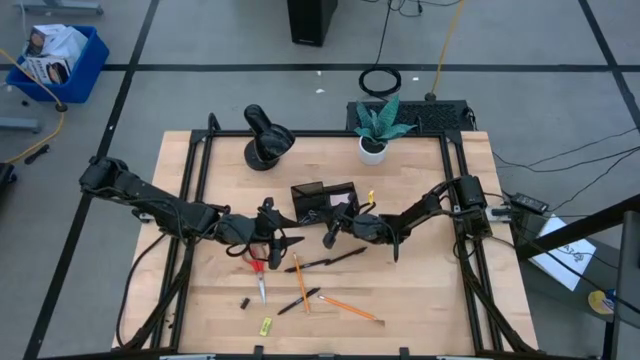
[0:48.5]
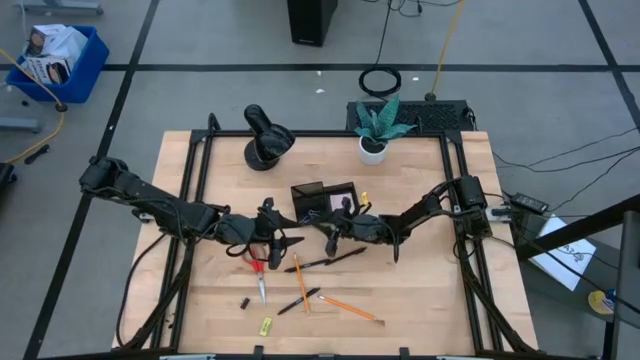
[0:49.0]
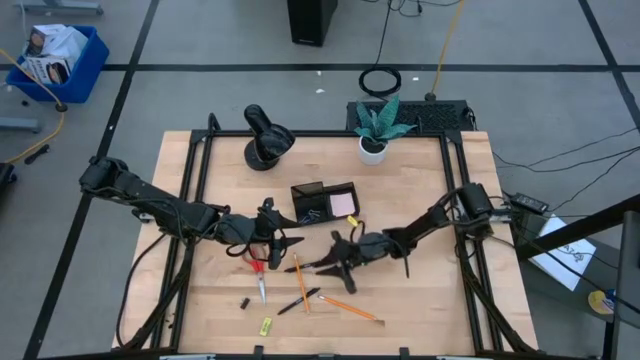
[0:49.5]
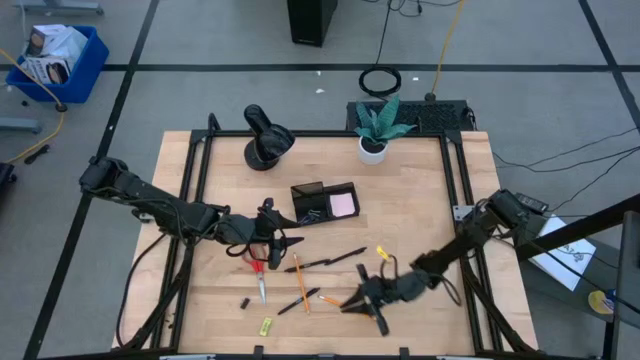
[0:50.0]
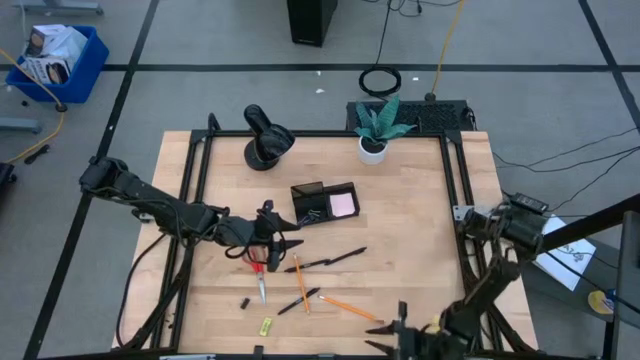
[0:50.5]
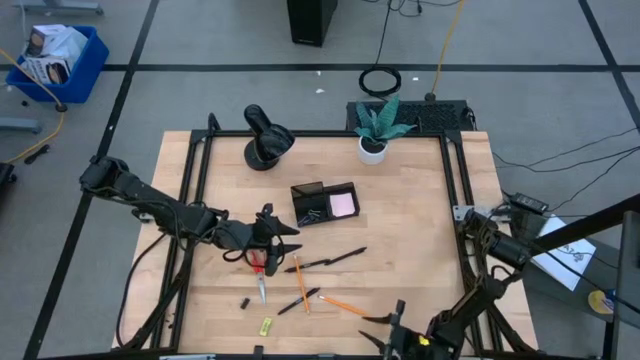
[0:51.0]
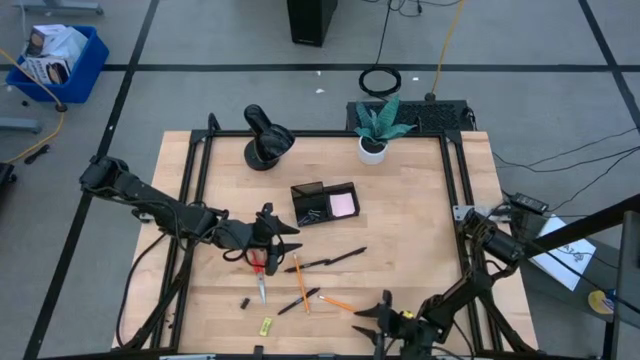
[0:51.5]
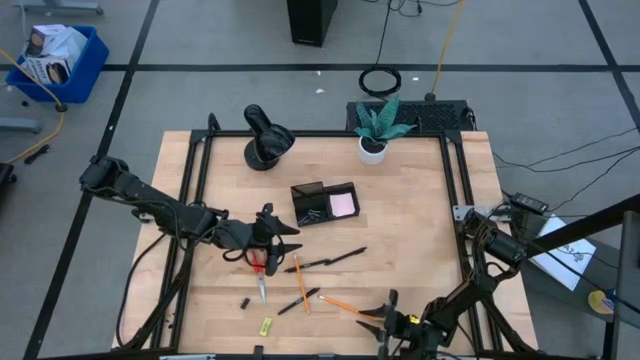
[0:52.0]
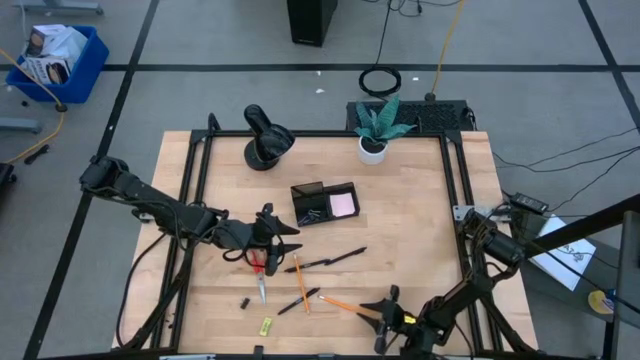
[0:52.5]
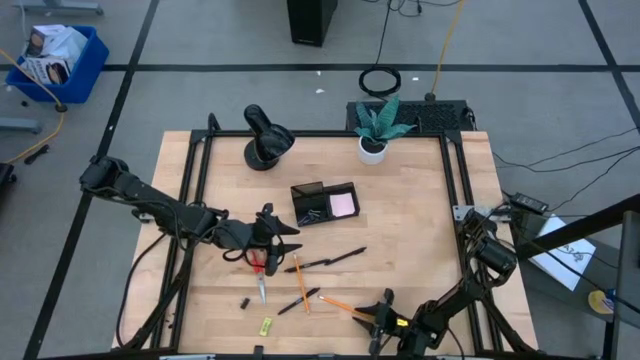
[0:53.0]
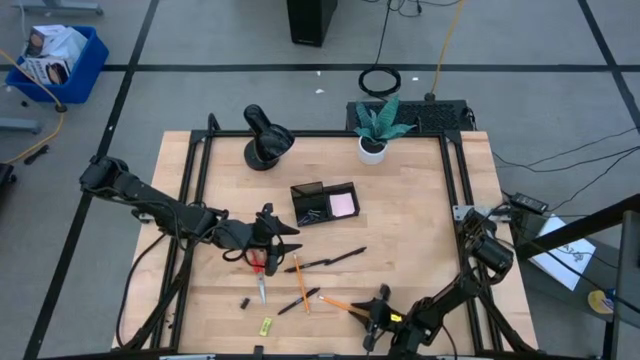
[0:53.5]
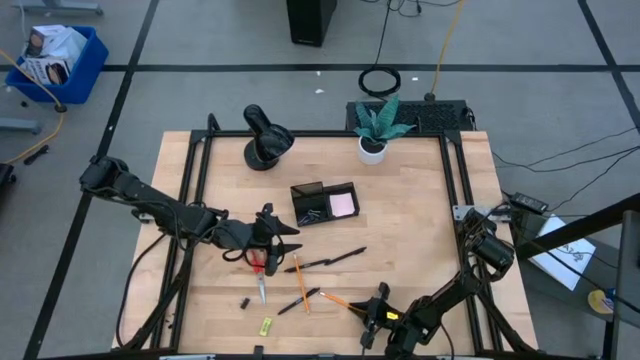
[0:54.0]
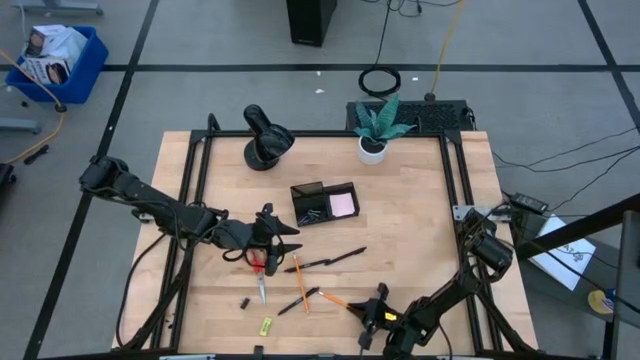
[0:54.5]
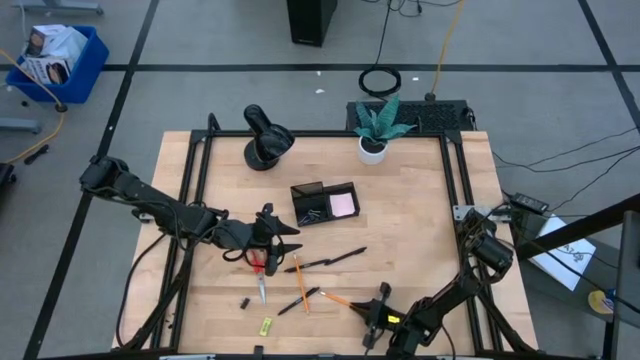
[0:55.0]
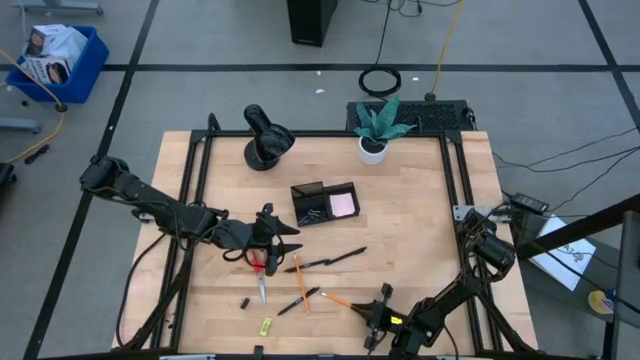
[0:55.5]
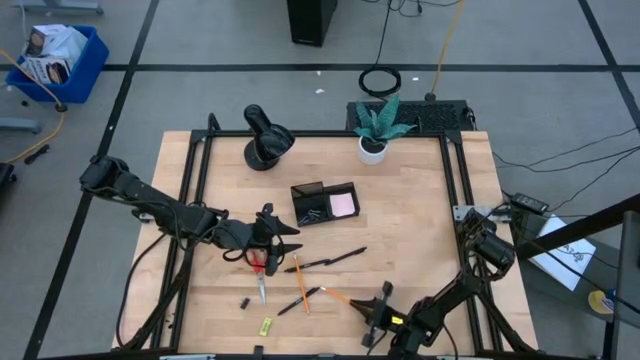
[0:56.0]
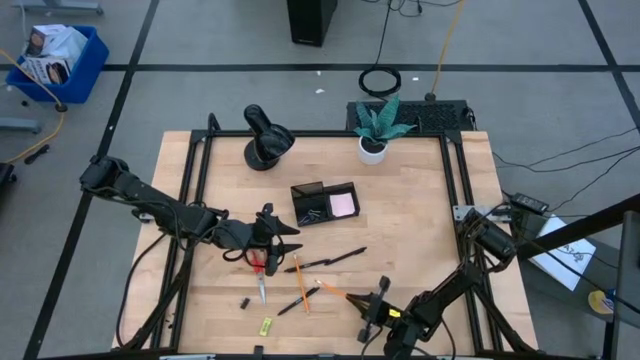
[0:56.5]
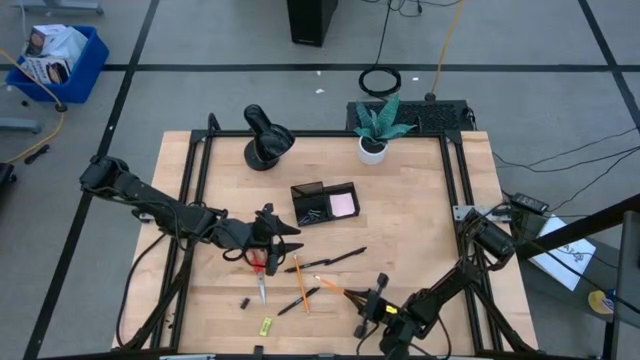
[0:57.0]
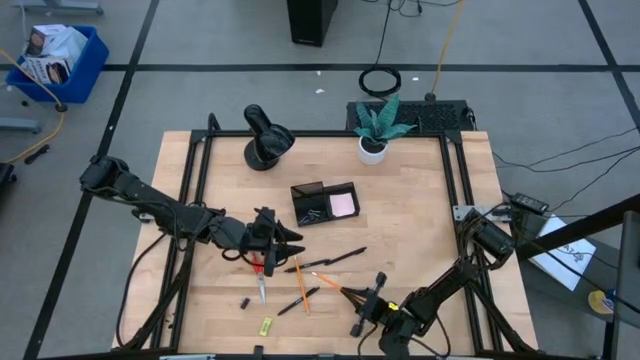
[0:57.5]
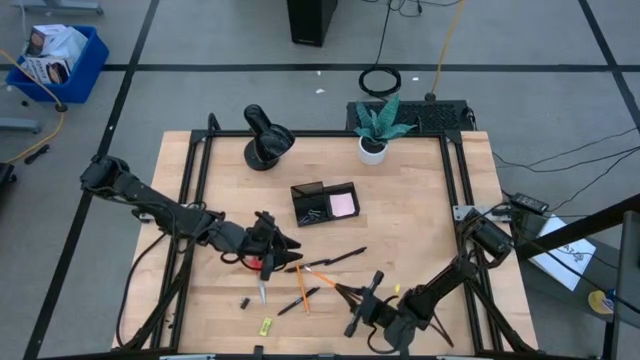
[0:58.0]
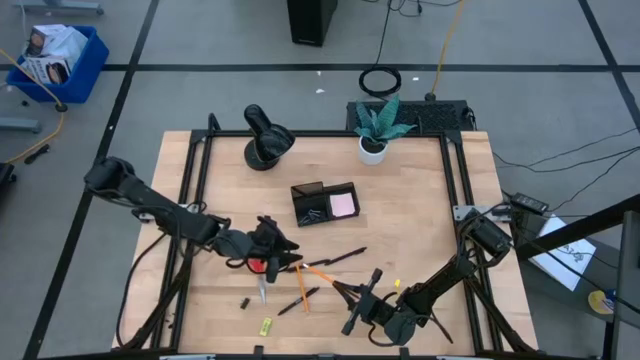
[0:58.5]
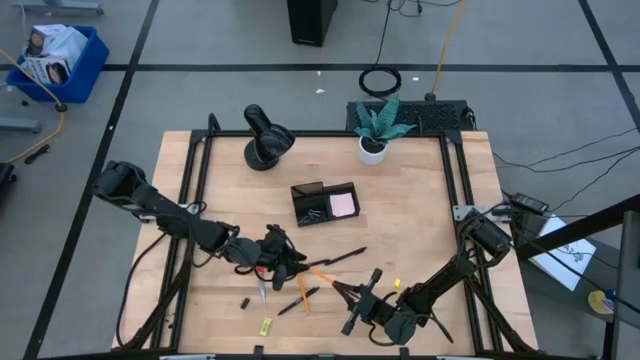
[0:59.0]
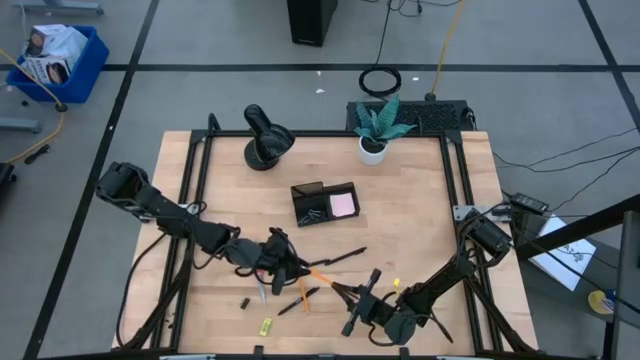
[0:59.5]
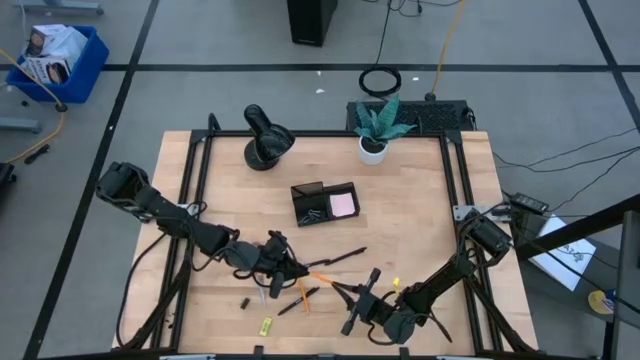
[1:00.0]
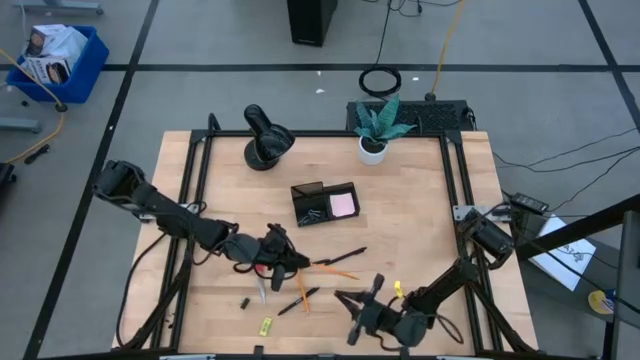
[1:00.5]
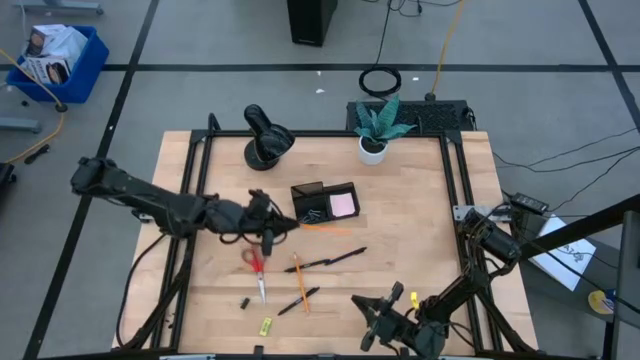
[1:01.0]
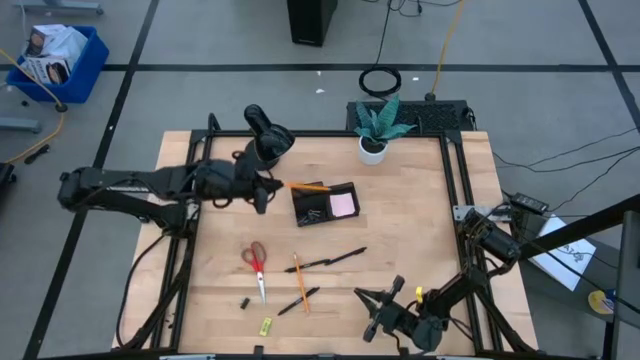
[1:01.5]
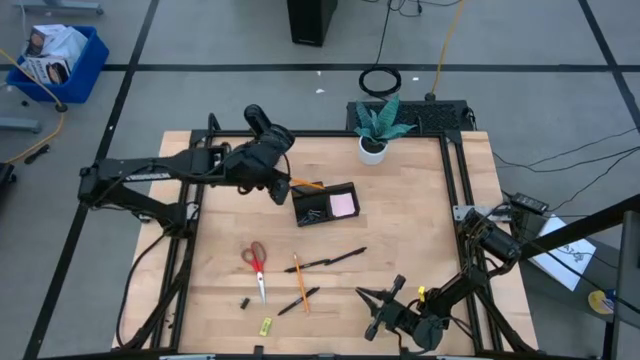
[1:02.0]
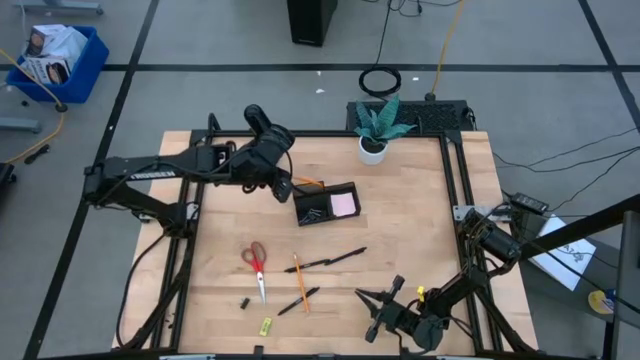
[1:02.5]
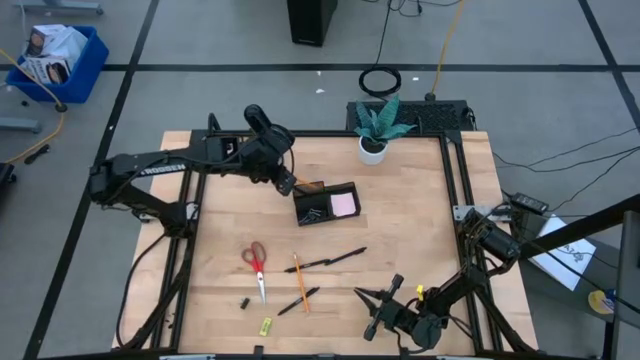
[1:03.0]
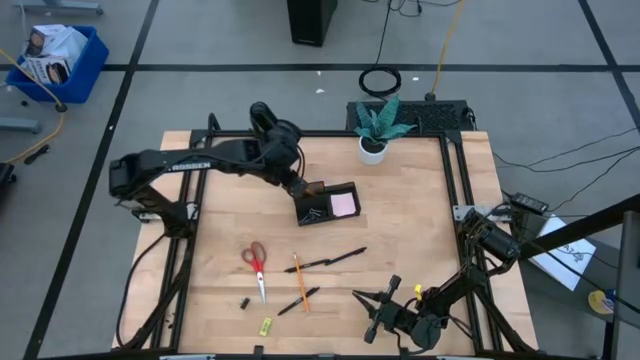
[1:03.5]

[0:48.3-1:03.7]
Task: Pick and place office supplies into organizer
Put the orange pencil into the desk organizer

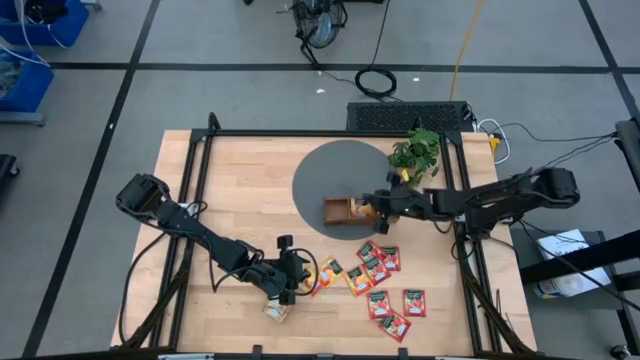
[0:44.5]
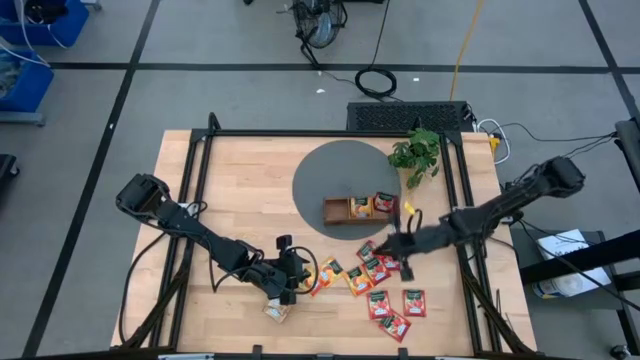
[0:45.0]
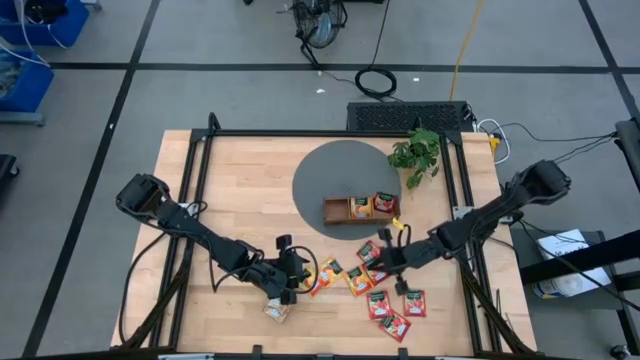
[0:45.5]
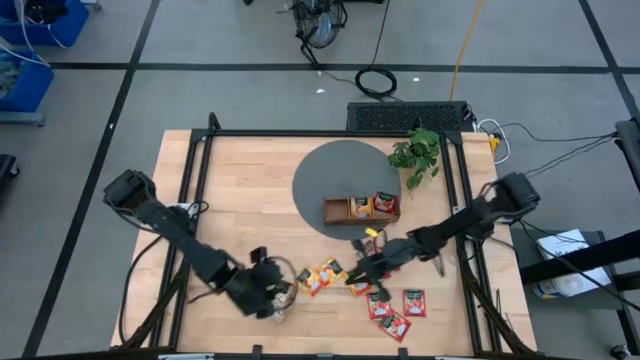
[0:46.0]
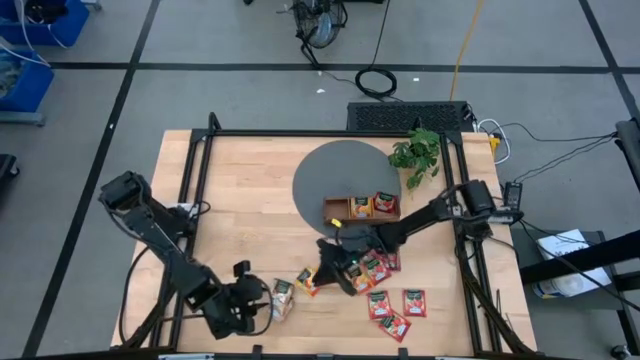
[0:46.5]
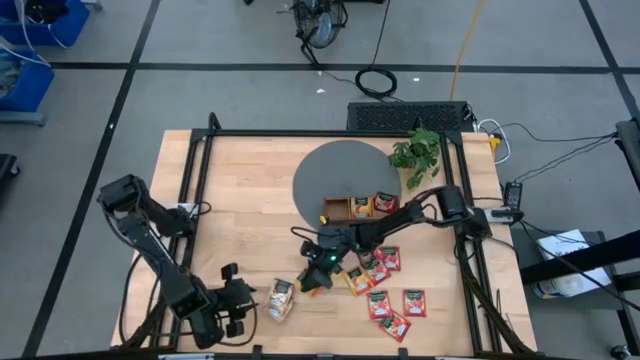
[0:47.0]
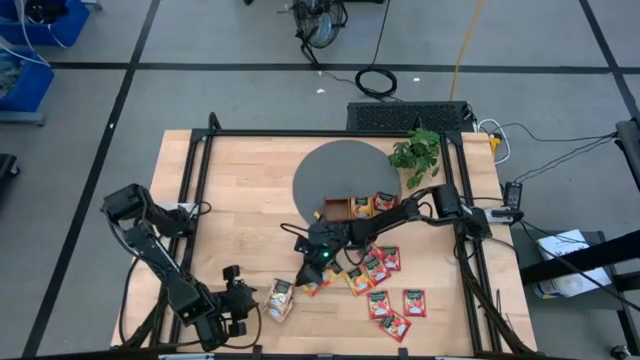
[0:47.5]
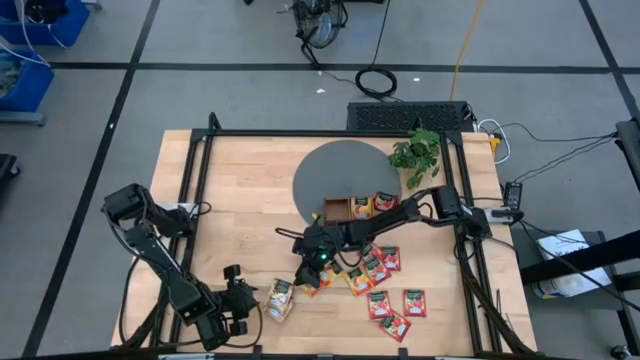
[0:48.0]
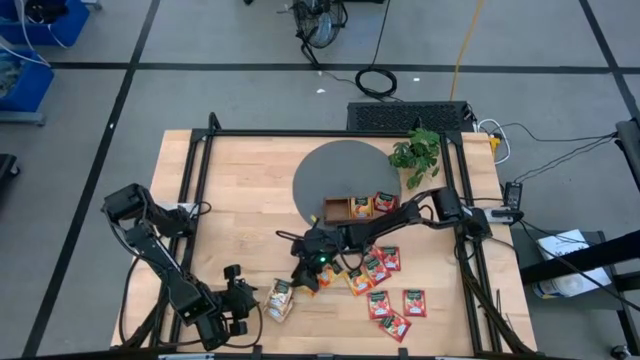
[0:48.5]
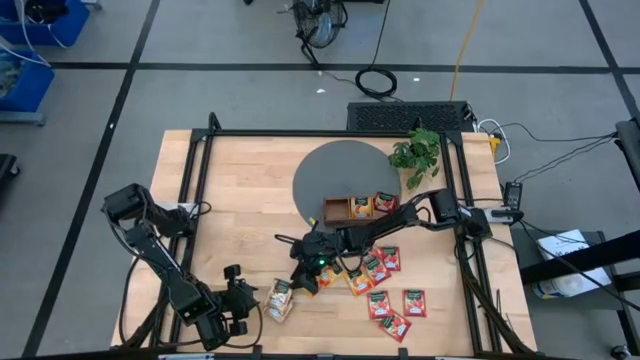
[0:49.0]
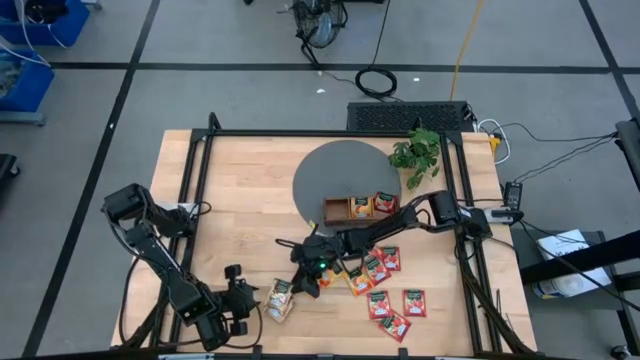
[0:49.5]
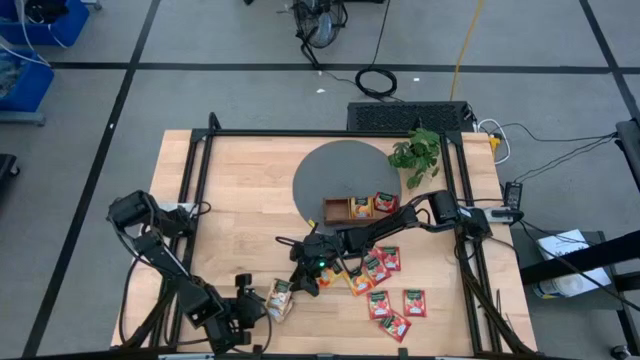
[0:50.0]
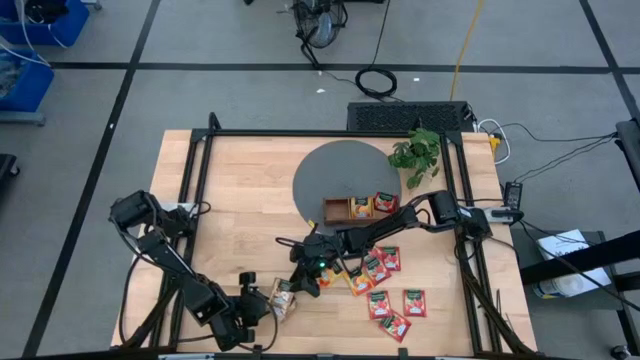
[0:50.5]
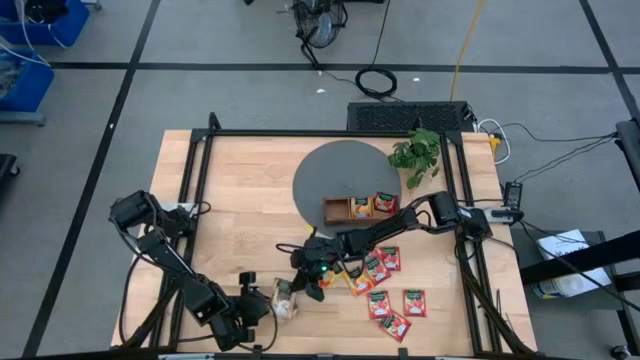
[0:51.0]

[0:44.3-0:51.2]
Task: Pick & Place Tea
Put the brown tea bag into the left section of the wooden organizer
